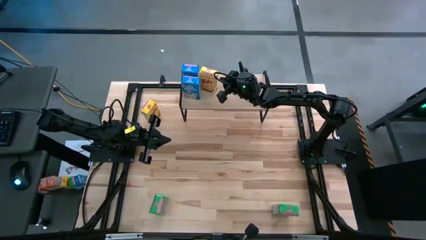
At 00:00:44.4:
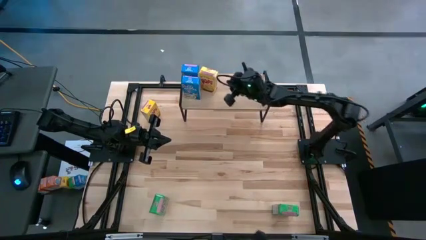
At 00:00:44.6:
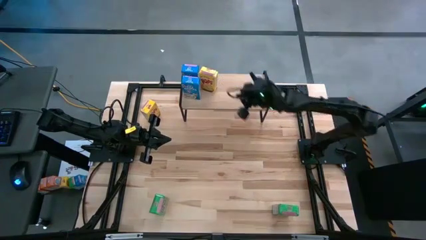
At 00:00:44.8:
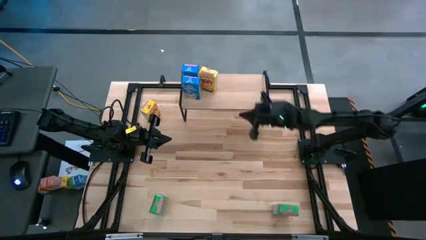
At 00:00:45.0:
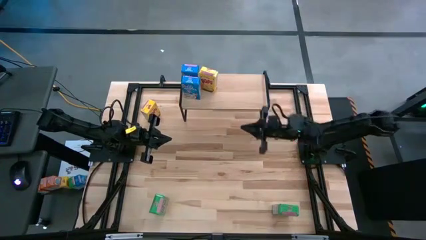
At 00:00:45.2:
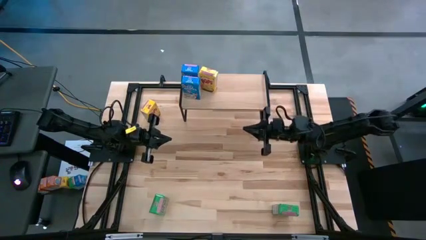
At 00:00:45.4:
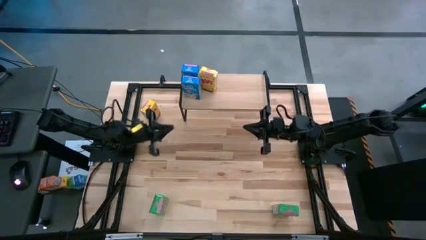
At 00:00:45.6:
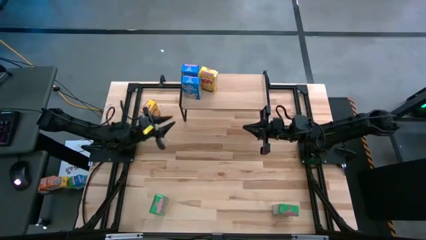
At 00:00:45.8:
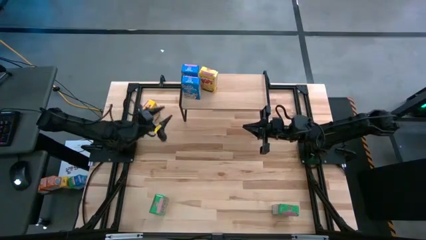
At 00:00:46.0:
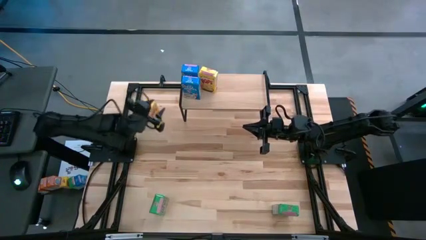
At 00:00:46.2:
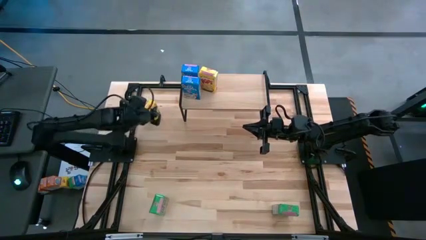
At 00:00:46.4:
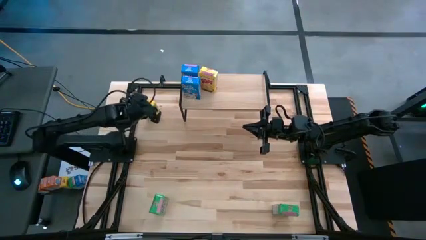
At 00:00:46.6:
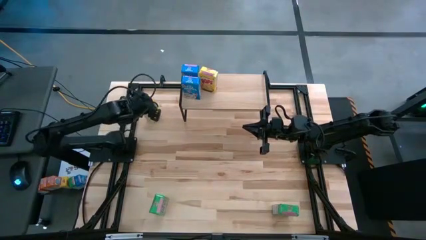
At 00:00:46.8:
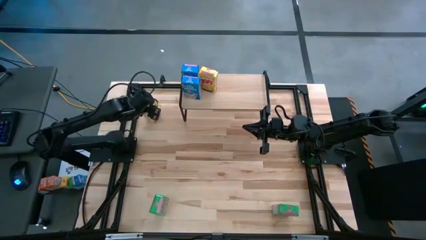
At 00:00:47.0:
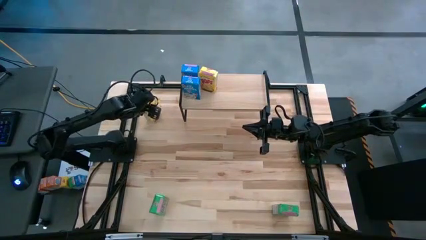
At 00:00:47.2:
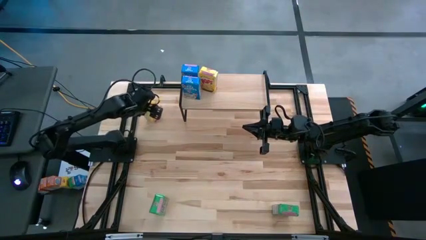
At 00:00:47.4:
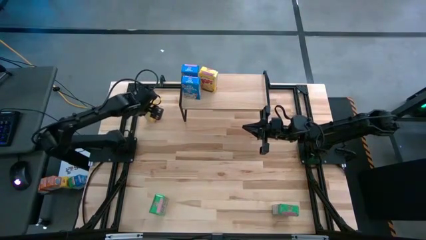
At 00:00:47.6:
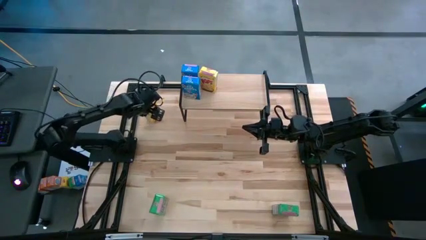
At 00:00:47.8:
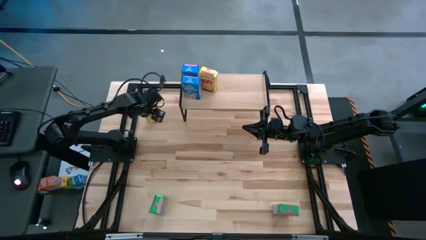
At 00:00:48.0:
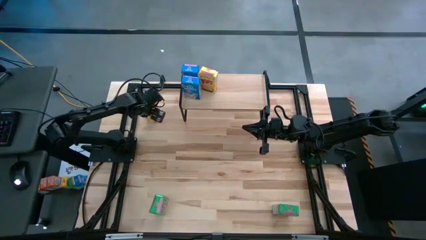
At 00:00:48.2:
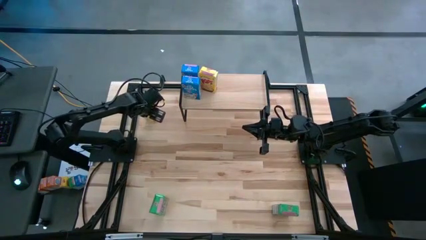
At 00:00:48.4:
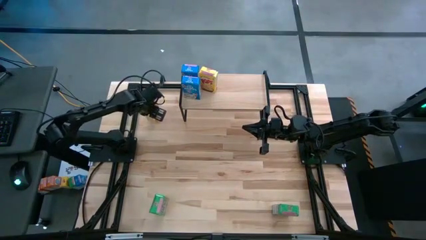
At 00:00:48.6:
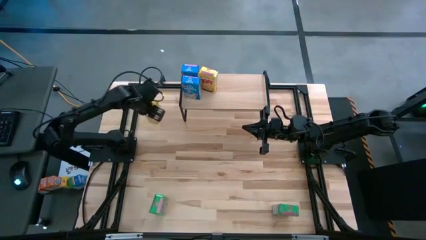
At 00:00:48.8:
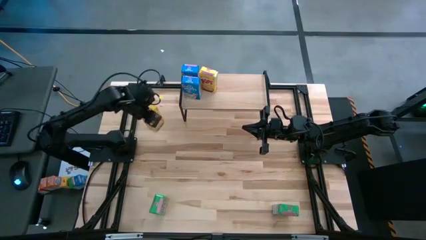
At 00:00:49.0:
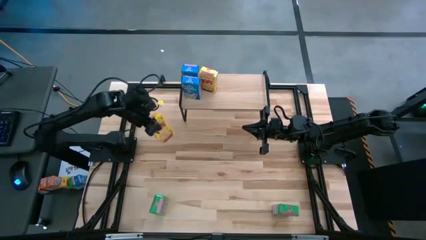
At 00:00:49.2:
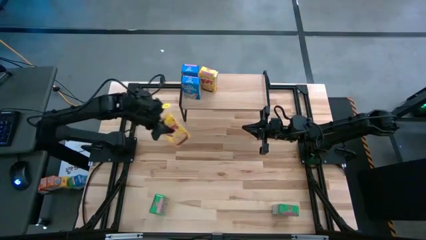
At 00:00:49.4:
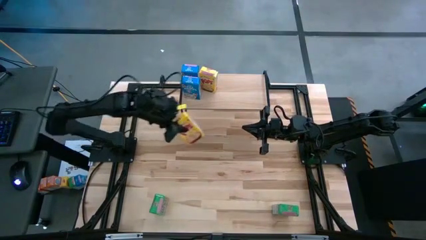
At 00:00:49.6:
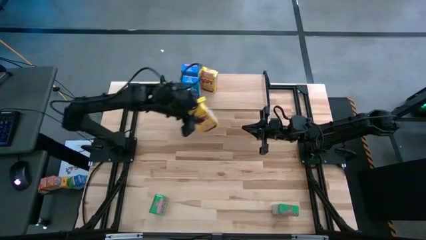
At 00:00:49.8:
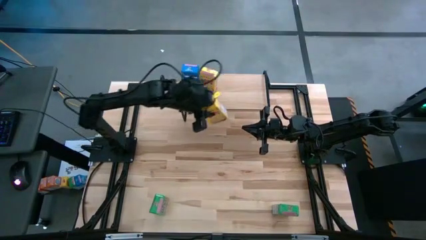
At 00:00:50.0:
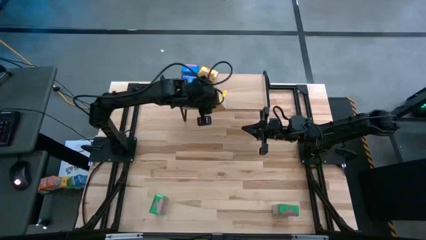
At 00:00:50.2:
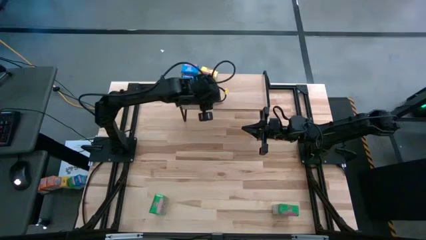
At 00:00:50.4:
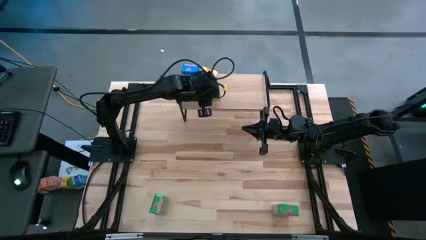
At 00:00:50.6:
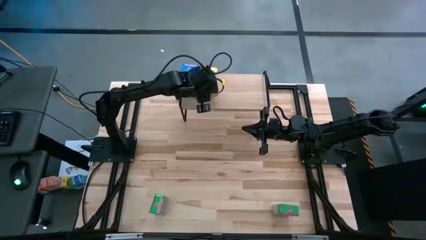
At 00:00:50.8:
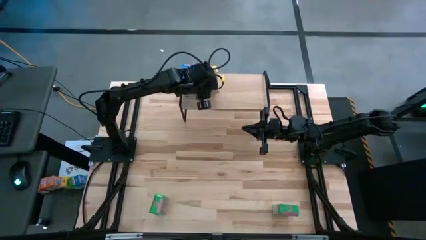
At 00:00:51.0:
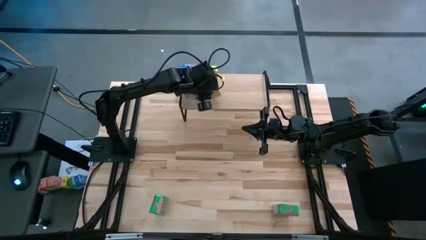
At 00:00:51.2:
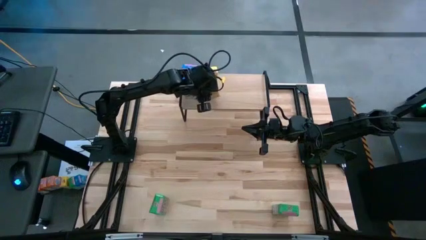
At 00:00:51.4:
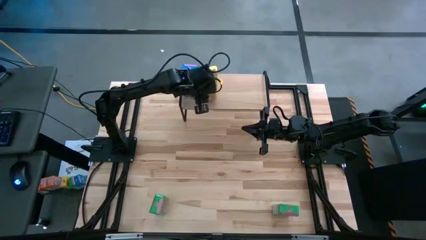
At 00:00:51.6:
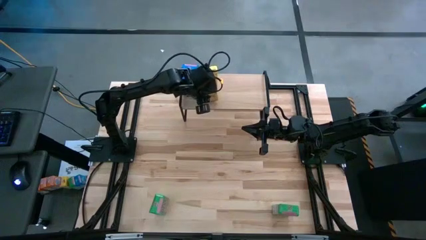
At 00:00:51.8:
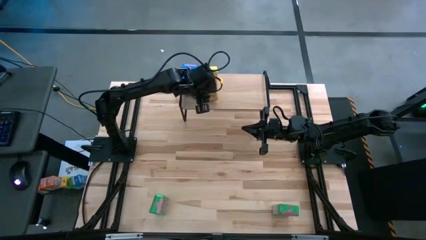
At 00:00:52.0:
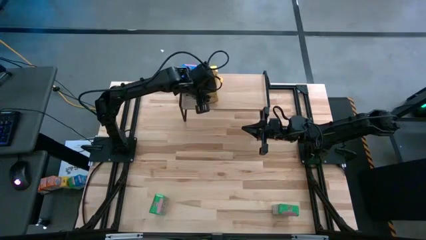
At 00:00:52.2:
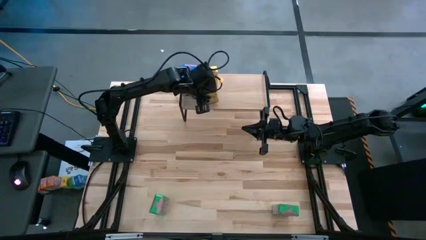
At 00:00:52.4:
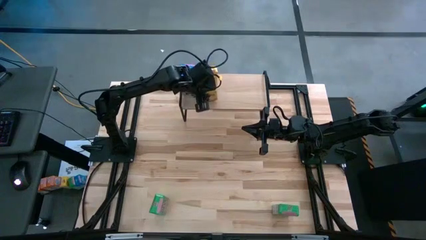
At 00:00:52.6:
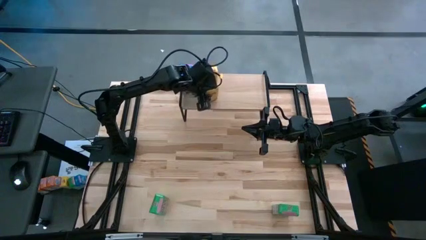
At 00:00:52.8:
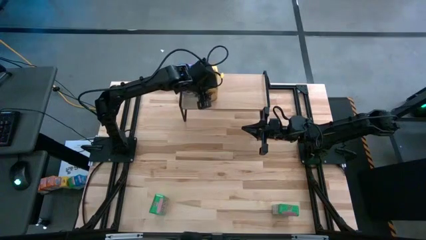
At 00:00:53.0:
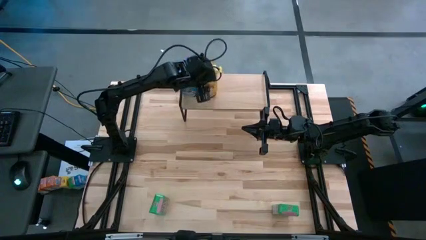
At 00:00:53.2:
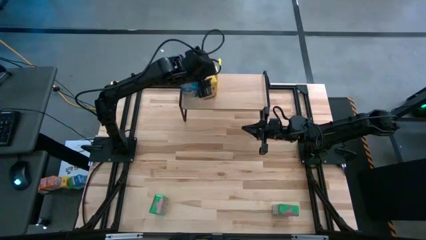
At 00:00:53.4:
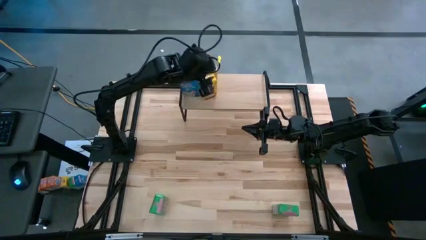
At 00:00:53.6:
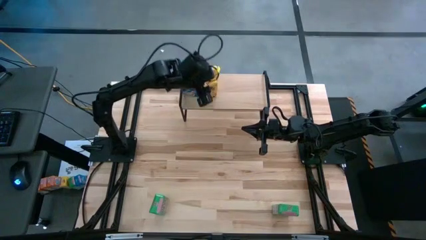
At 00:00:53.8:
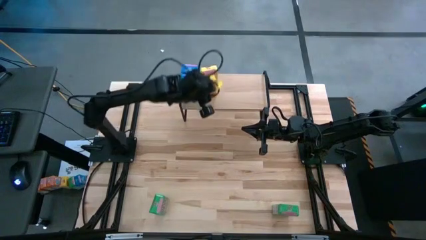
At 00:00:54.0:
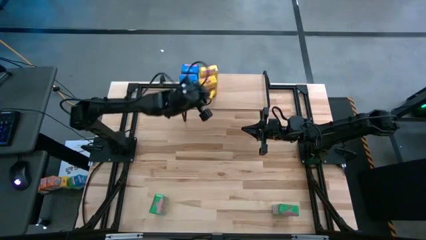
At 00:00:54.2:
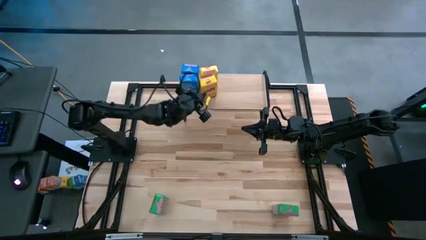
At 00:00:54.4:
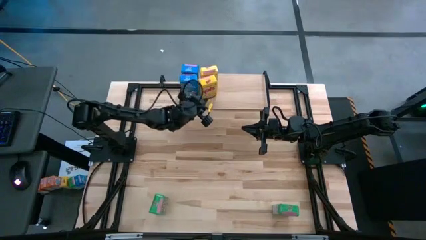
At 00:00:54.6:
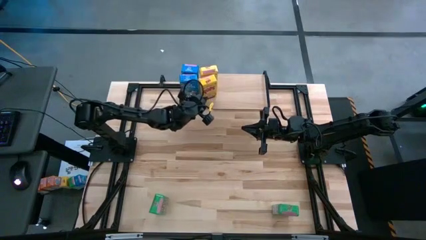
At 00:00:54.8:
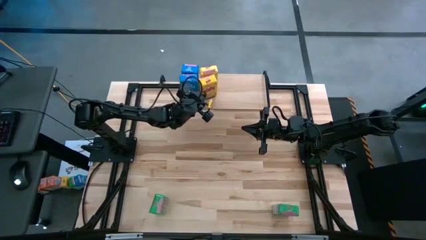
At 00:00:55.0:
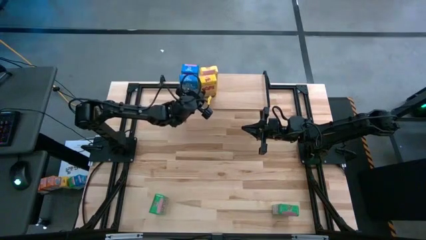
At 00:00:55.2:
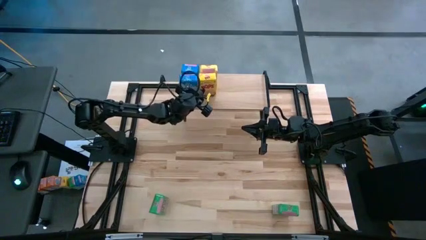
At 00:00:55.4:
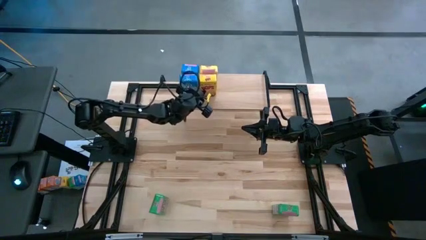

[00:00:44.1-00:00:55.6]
Task: Stack cereal on shelf
Put the yellow cereal box on the shelf aligned with the other yellow cereal box

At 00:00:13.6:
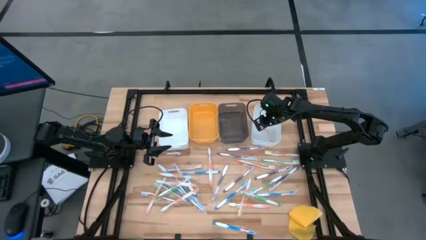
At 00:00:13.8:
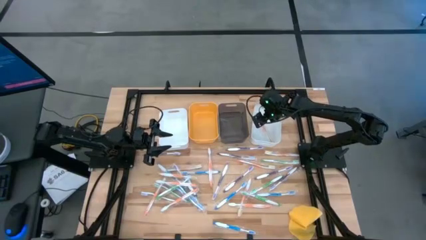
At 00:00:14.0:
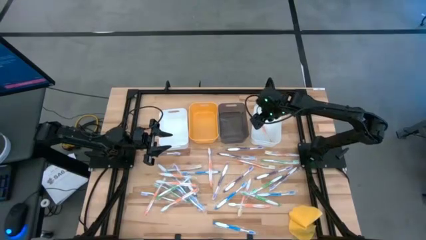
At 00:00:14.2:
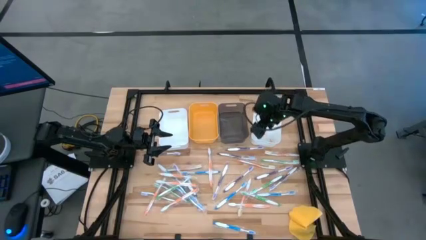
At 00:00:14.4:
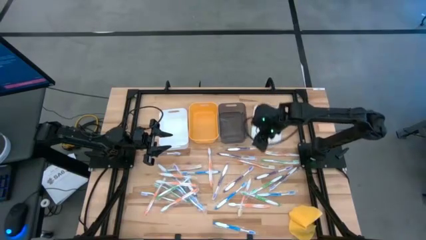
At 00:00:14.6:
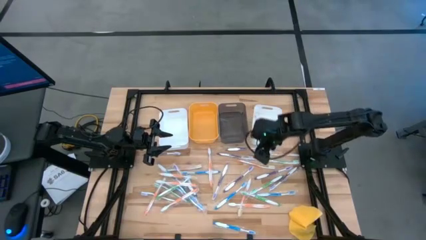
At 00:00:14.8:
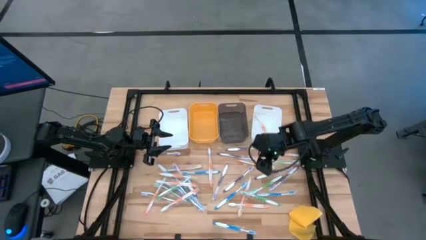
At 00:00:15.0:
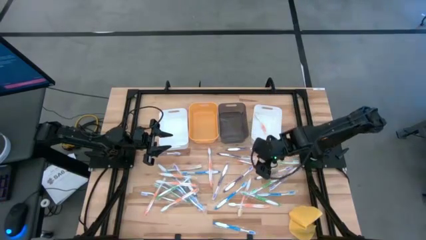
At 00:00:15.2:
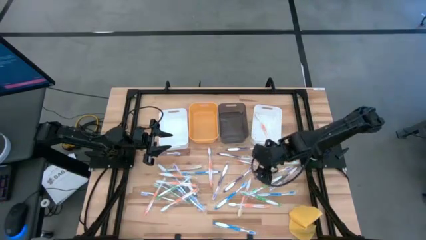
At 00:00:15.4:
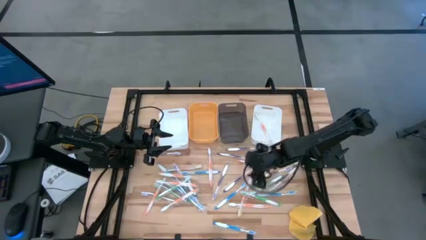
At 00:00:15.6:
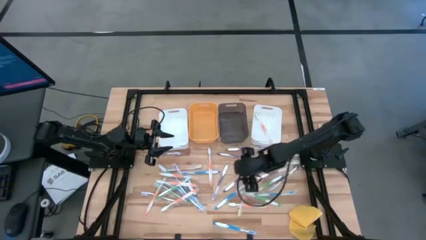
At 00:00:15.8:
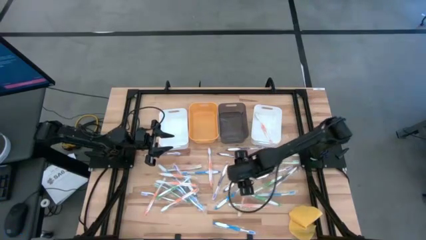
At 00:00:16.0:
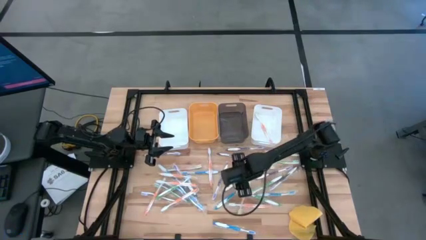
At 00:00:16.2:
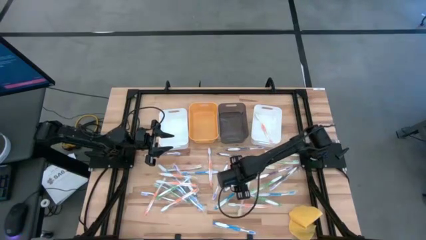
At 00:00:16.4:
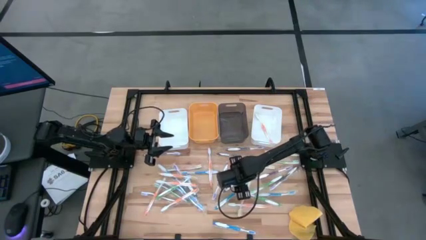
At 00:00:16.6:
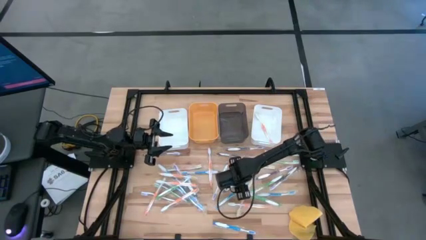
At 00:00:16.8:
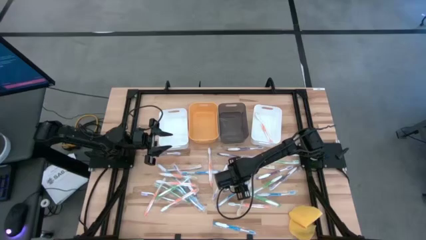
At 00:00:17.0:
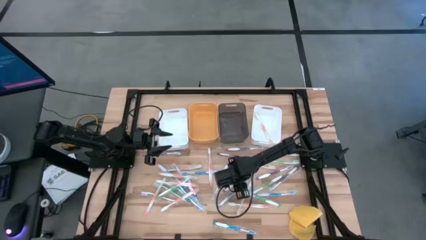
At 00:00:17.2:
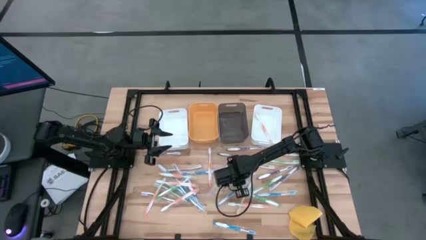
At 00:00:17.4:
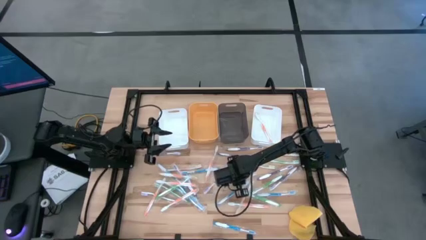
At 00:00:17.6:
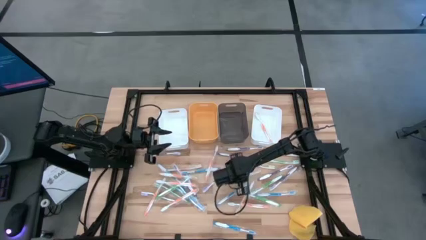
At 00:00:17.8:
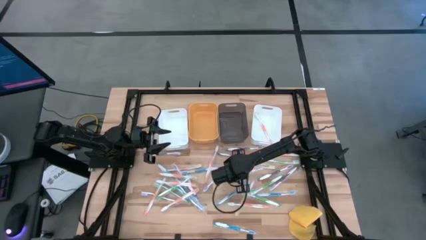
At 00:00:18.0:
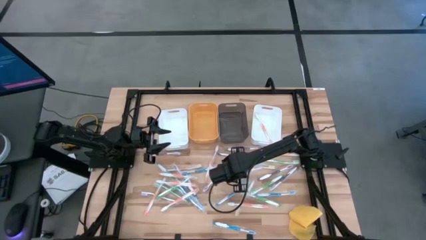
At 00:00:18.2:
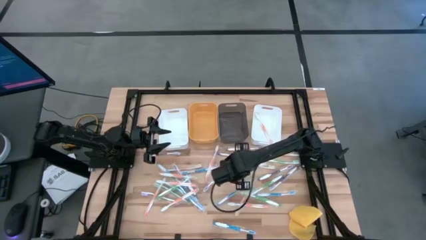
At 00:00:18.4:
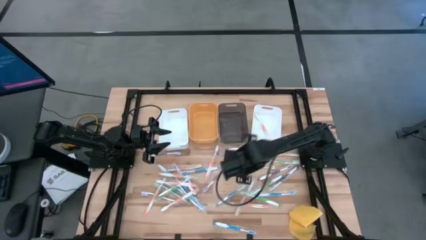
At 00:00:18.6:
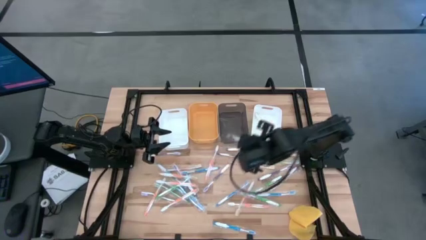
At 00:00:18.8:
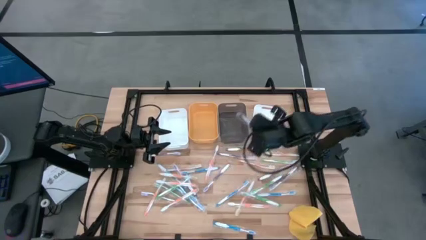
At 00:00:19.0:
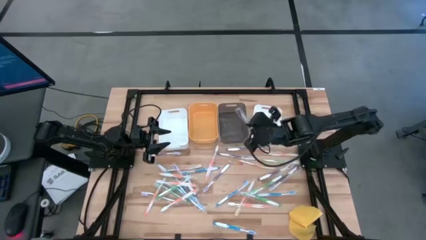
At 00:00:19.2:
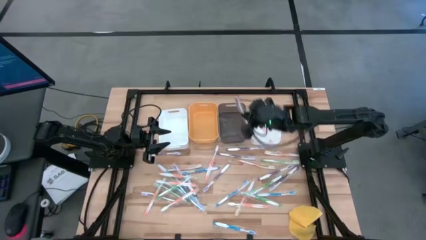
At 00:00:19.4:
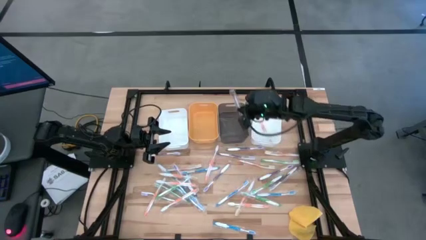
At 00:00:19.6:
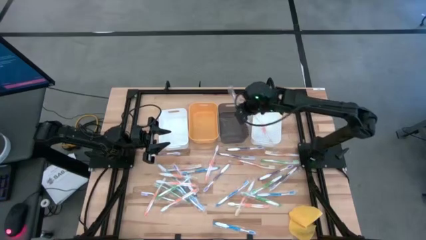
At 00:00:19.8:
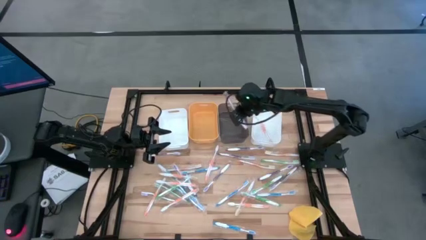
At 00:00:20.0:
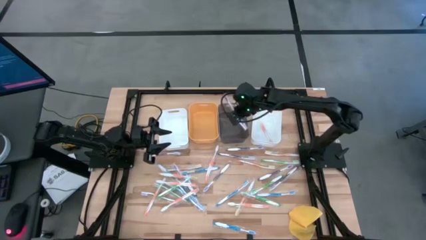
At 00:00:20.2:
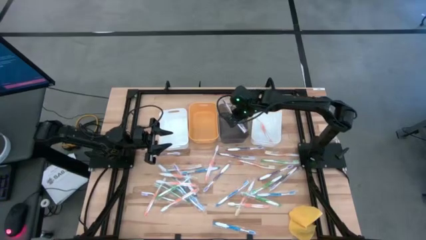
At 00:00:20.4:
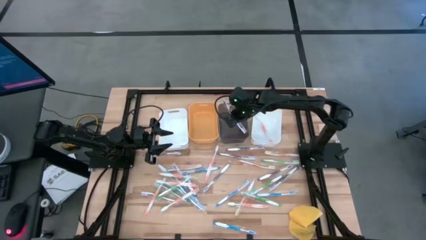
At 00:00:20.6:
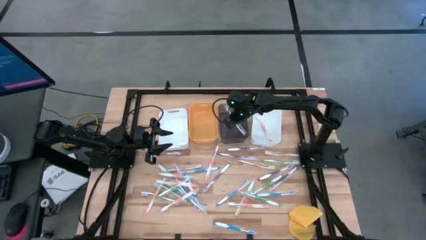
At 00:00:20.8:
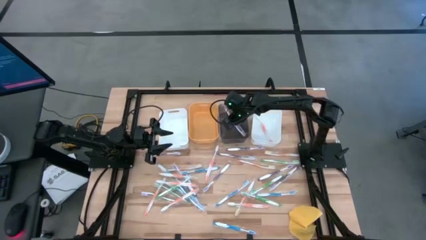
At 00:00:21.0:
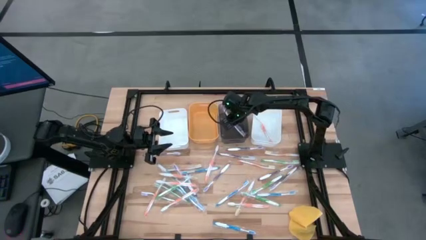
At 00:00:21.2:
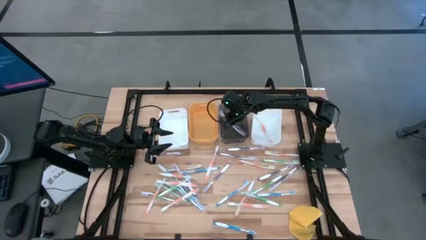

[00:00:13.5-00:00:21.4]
Task: Pick & Place Toothbrushes
Put the purple toothbrush into the black transparent bin
